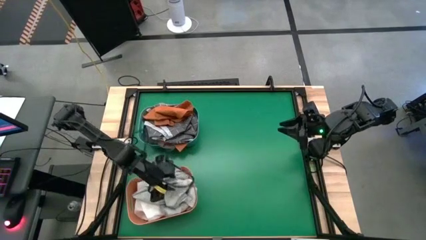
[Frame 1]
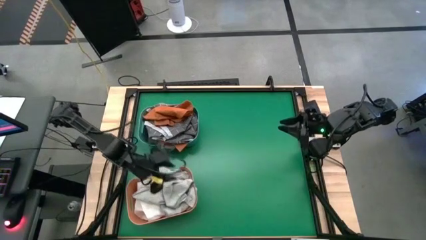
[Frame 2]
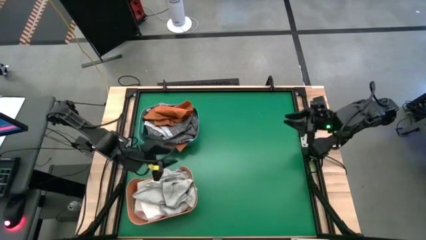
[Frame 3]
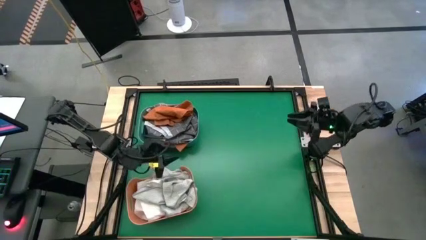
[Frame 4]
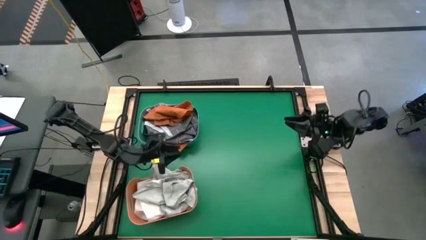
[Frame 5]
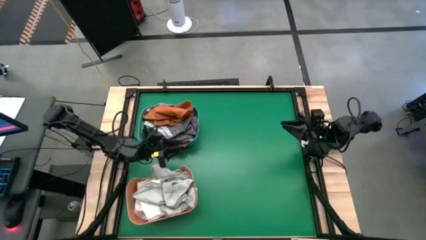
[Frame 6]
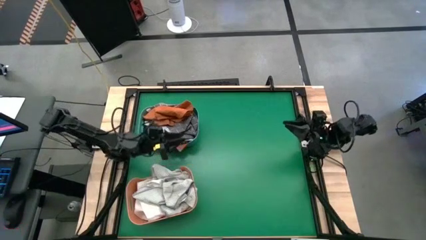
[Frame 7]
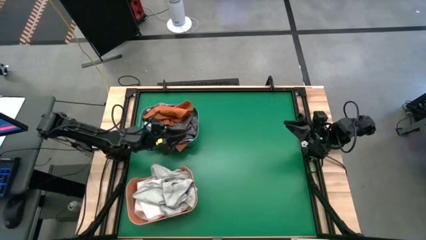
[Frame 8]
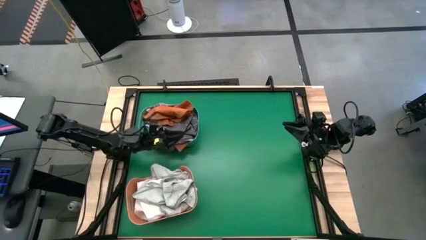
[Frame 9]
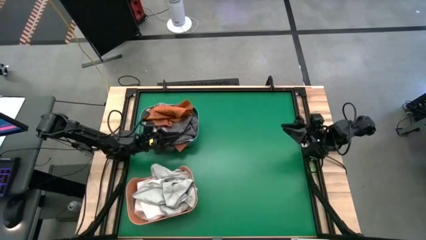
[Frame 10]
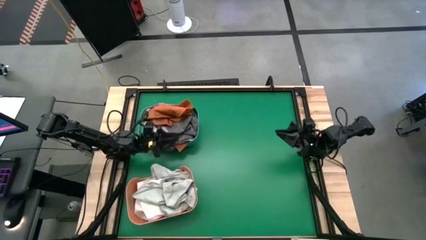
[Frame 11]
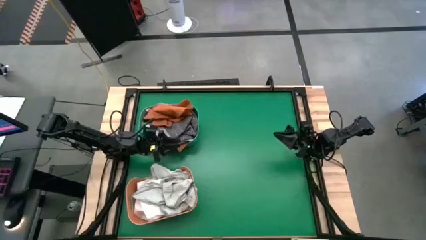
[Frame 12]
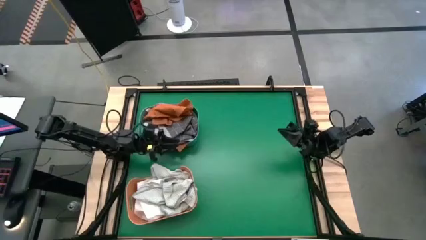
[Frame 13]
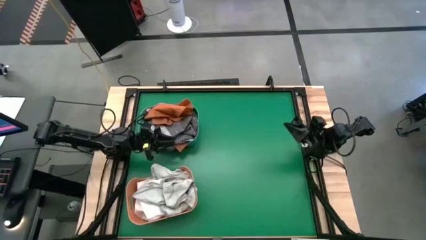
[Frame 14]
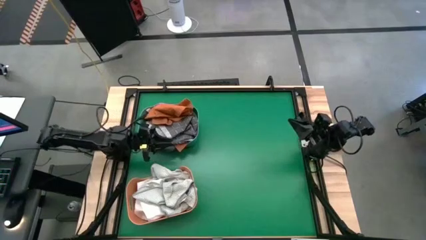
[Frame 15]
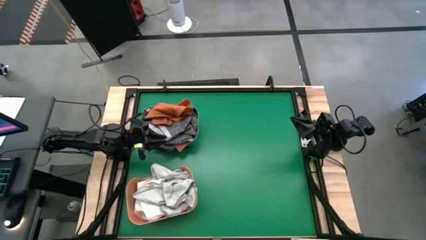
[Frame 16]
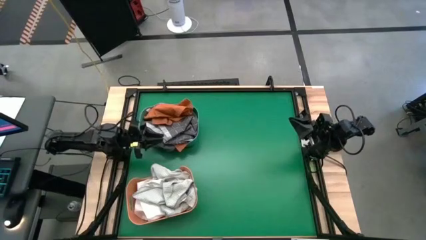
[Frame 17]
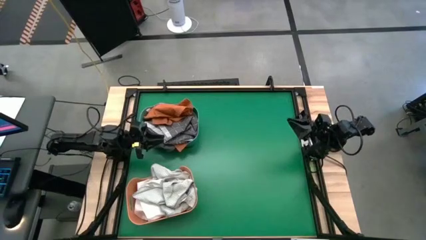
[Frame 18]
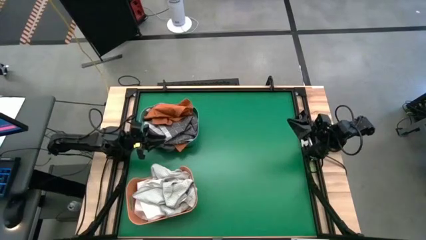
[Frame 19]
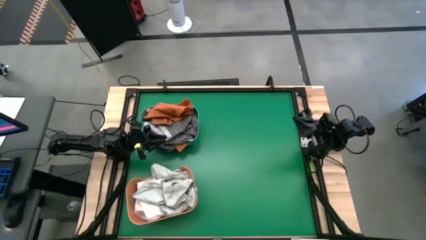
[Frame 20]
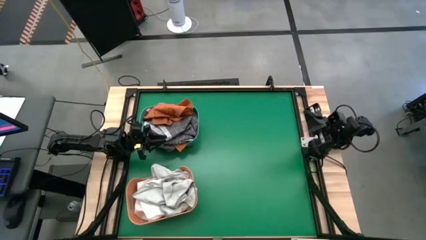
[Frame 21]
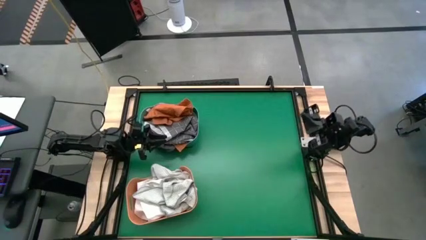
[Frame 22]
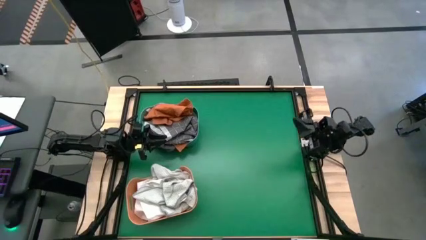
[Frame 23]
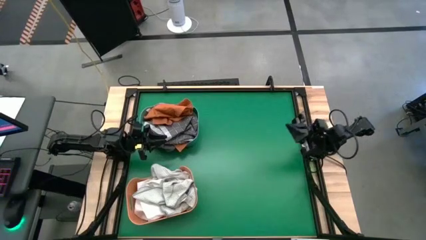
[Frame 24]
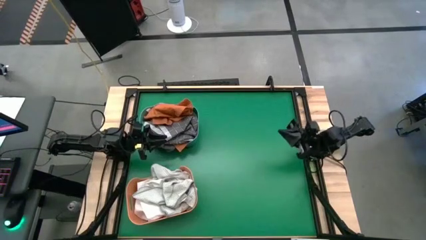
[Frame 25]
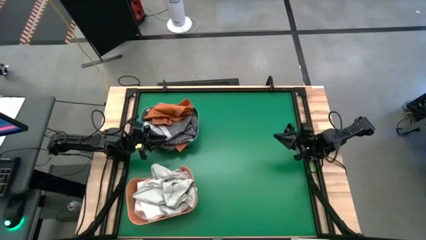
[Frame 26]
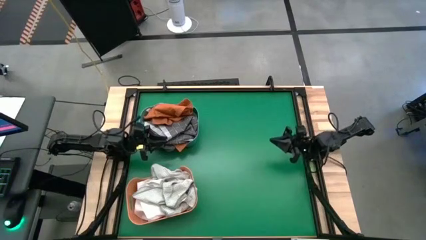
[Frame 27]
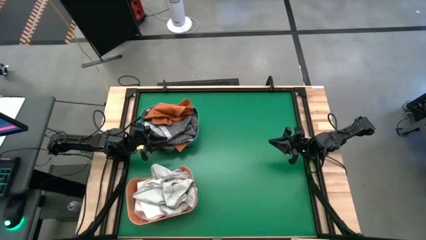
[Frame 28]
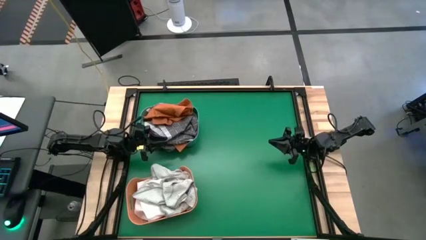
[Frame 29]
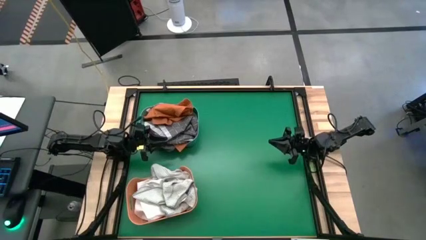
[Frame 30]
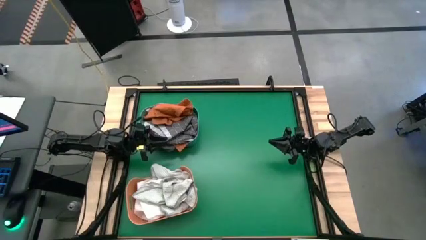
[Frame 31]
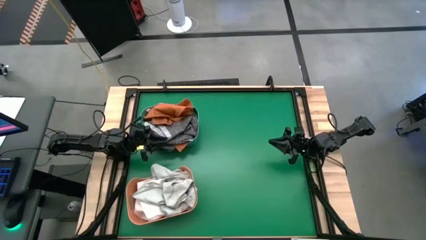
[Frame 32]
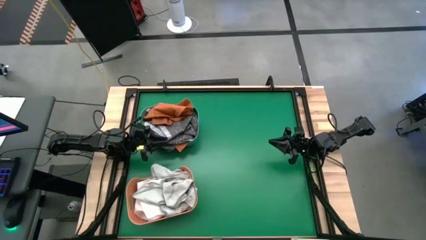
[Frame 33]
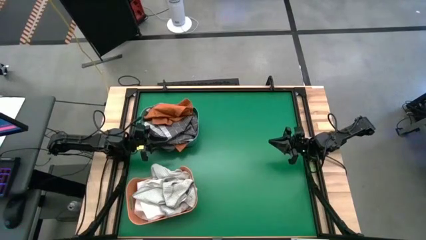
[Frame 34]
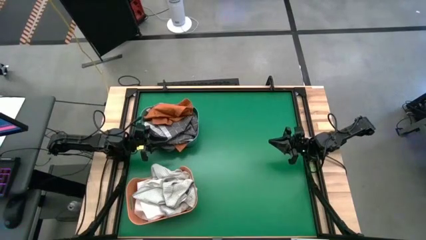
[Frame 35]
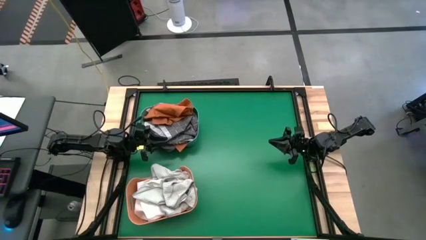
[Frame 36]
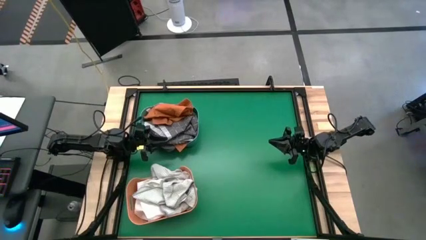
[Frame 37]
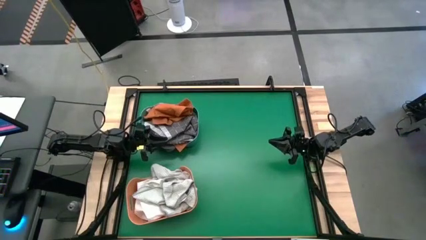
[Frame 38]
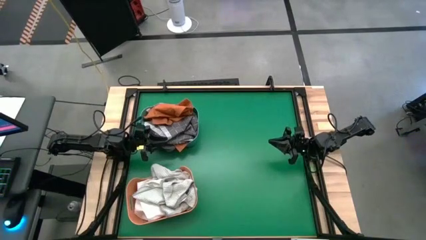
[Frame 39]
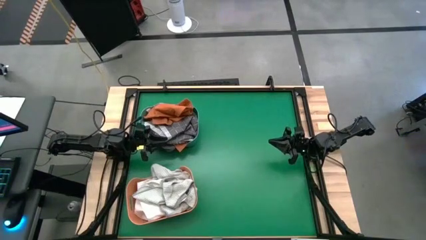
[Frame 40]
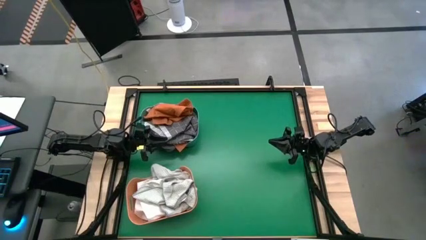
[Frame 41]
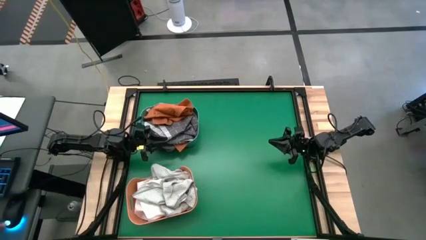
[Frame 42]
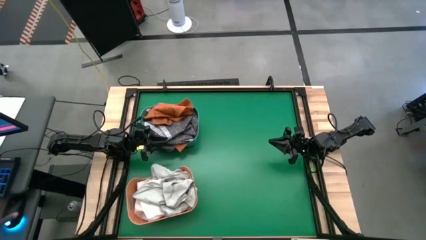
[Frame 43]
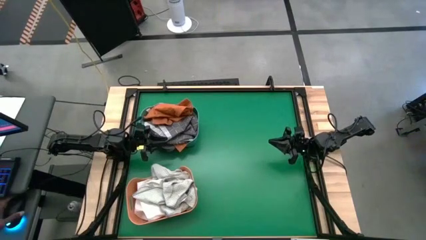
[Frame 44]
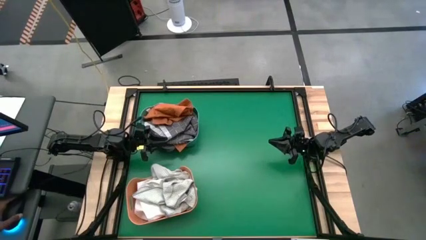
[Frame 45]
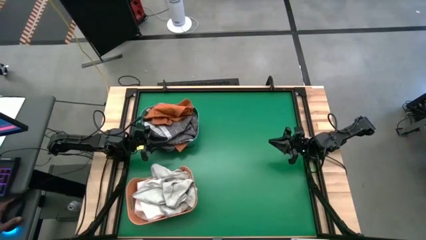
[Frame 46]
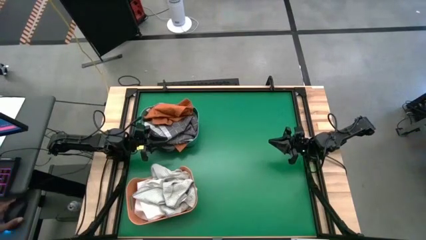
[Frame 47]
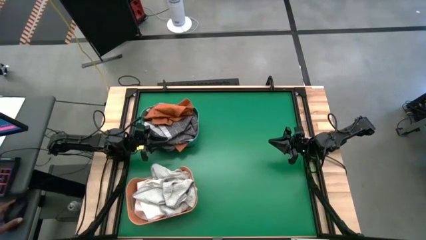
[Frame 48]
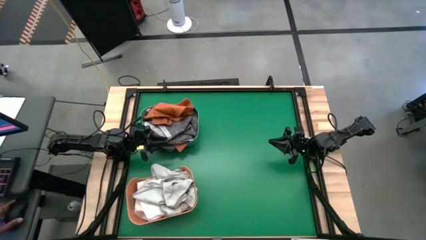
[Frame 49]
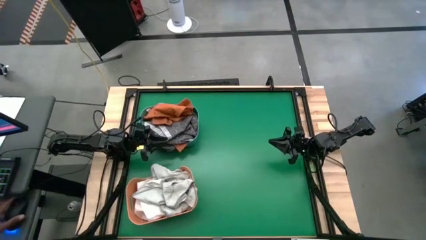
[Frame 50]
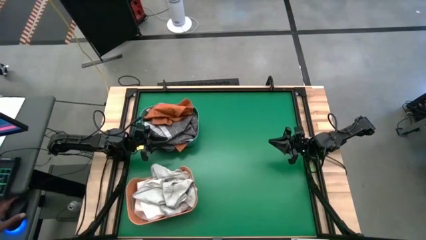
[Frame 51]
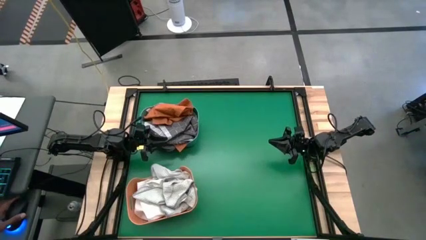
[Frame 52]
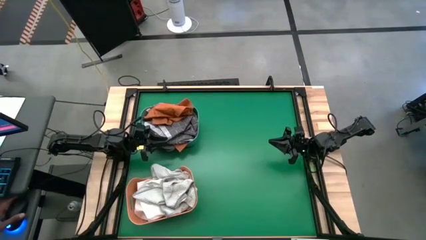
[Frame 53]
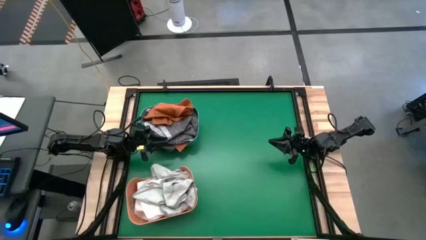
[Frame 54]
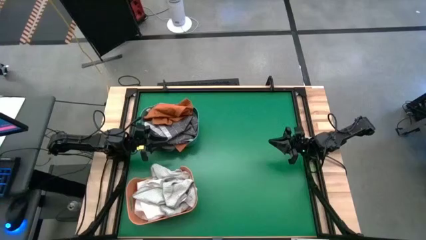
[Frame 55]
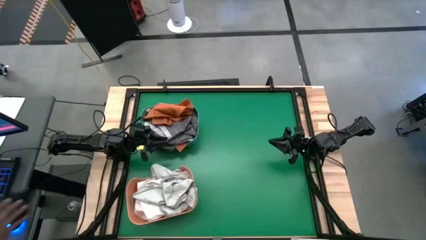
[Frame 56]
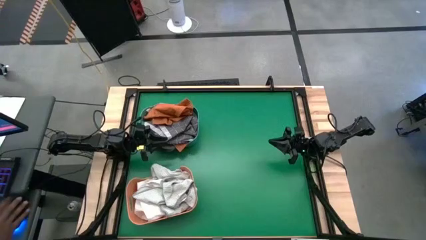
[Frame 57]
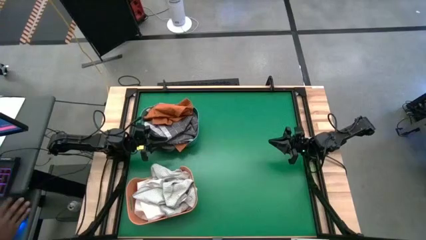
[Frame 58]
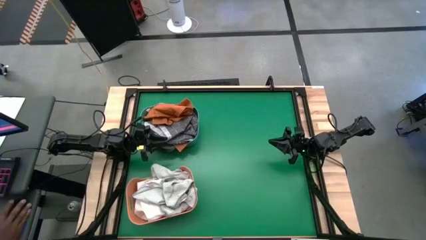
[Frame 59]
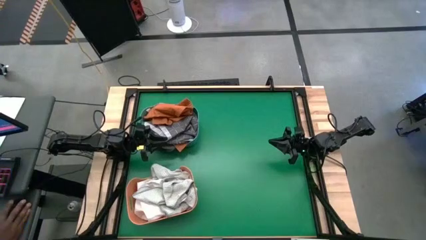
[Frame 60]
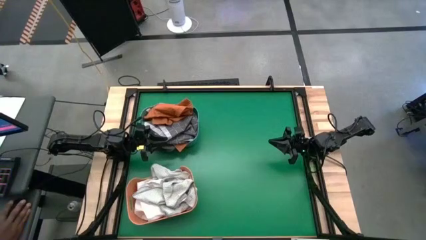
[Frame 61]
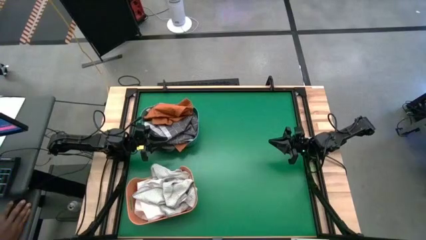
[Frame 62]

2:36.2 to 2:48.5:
Task: Sort microfiber towel by color & place in baskets
Return to Home Position

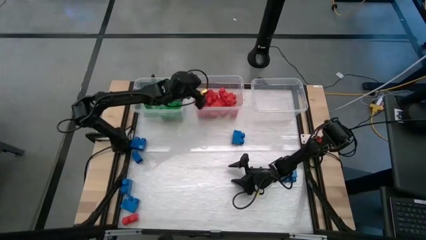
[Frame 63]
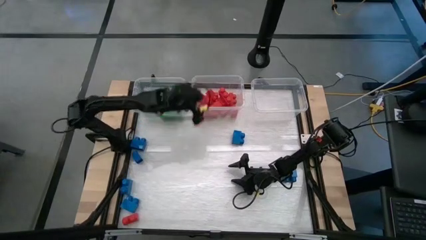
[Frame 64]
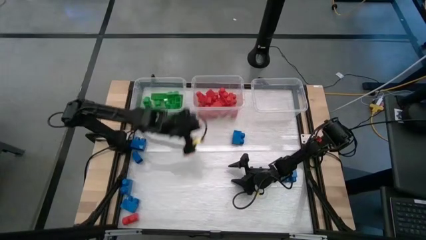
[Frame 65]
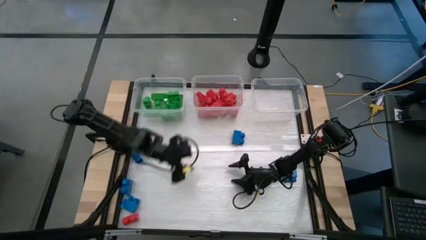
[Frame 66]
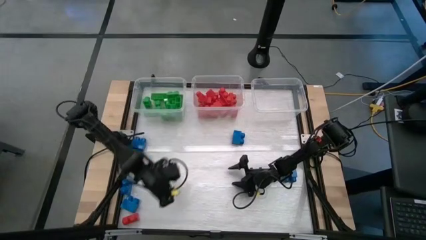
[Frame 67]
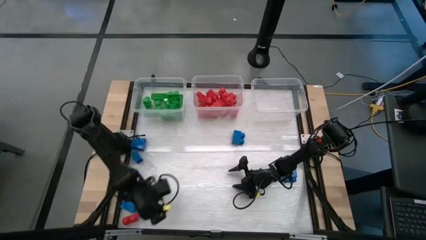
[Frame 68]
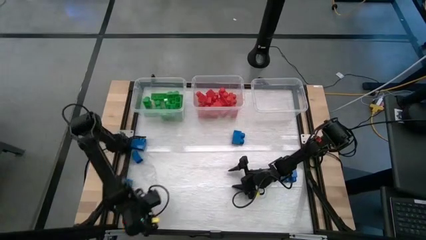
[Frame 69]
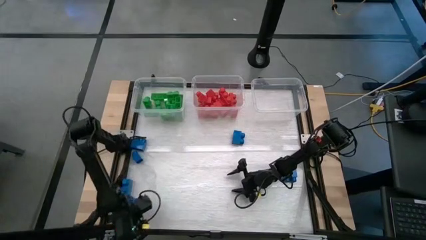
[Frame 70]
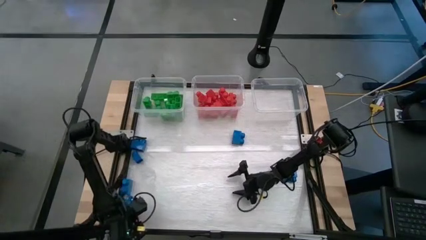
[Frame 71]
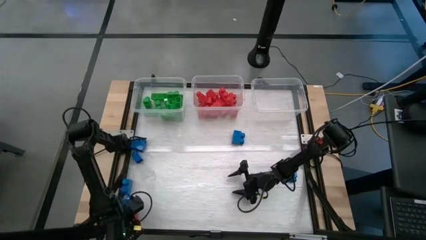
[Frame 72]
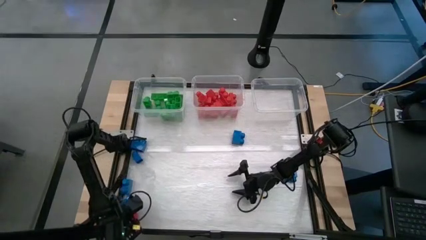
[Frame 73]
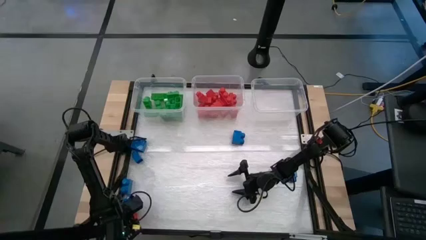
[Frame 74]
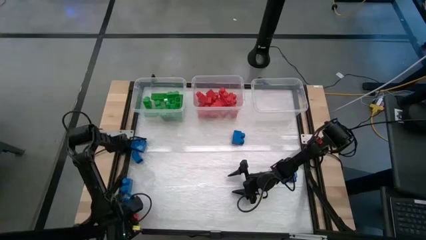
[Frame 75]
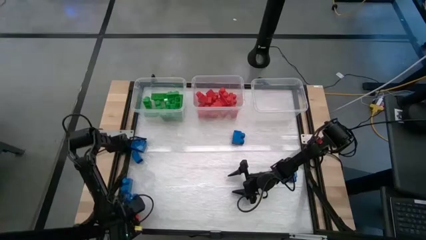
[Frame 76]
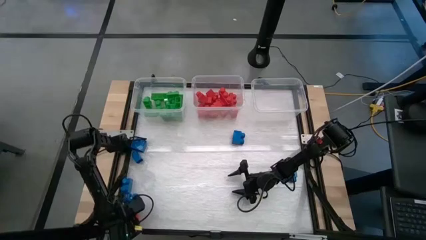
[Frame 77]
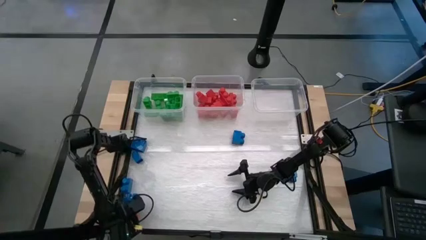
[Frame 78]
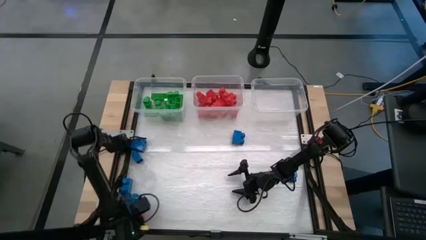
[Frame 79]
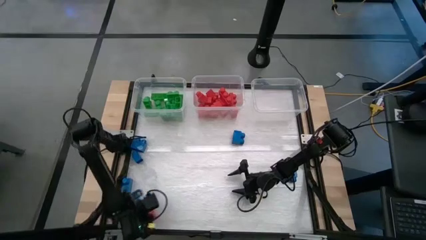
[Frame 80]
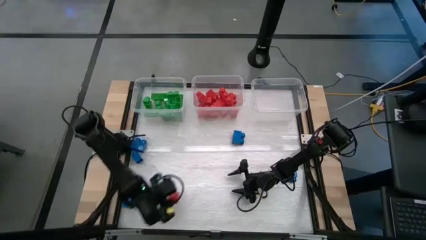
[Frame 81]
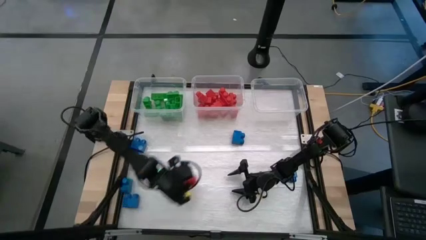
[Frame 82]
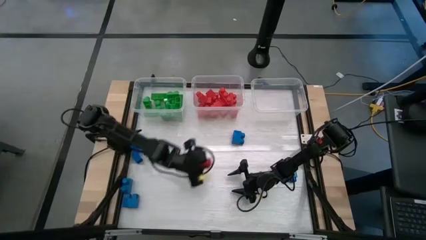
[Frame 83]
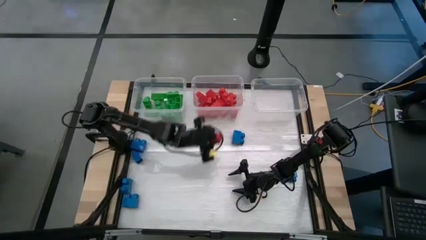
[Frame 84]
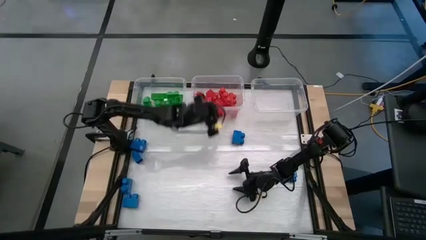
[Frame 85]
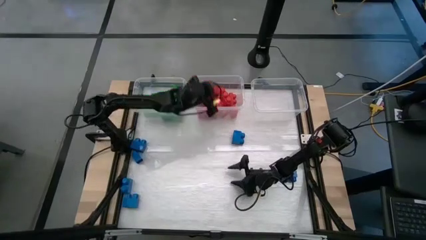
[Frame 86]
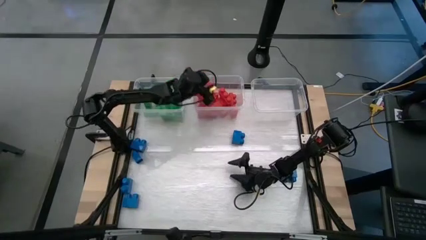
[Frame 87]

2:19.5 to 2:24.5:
Task: Sort blocks
Put the red game piece into the middle transparent bin
